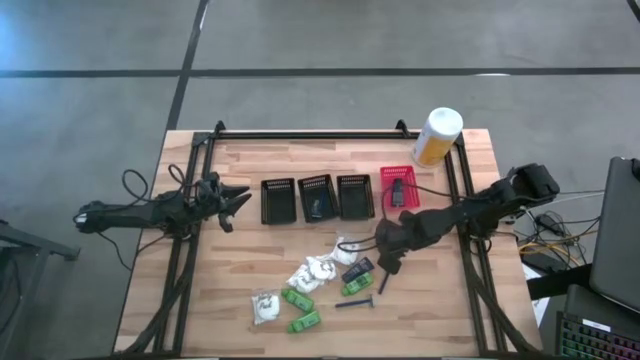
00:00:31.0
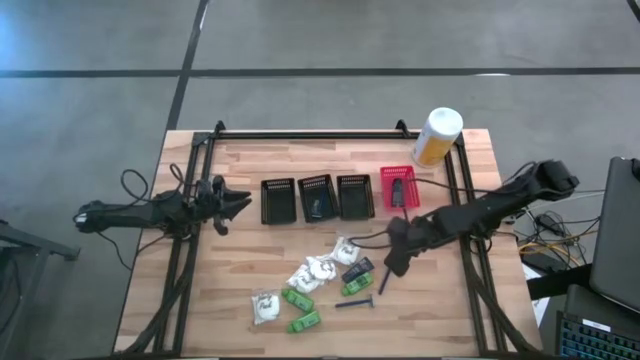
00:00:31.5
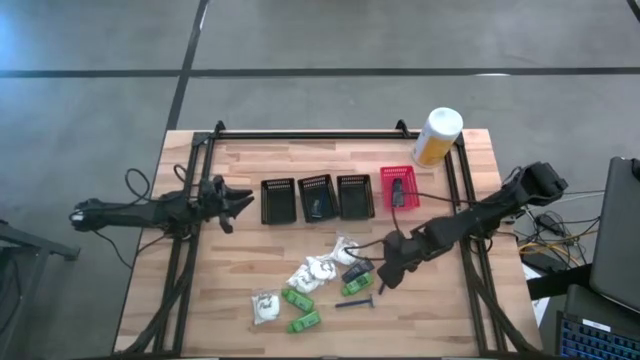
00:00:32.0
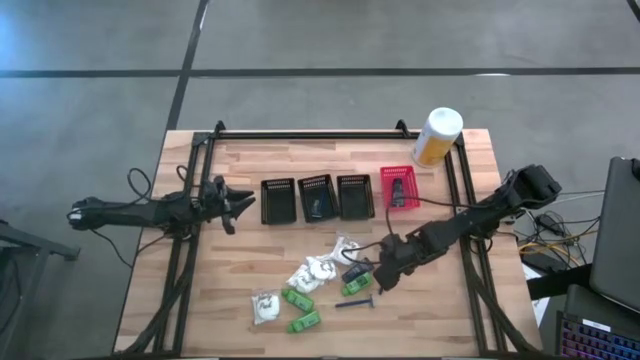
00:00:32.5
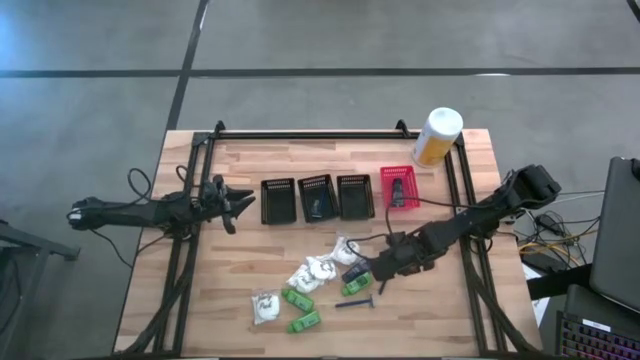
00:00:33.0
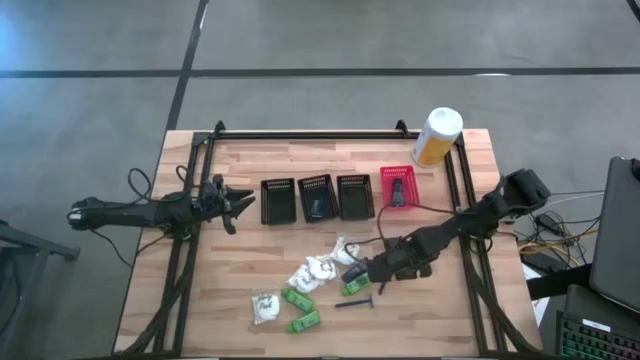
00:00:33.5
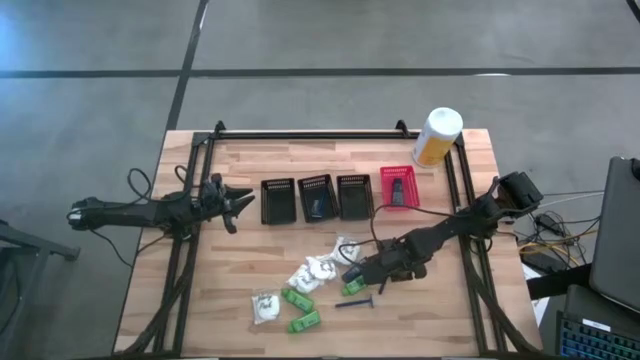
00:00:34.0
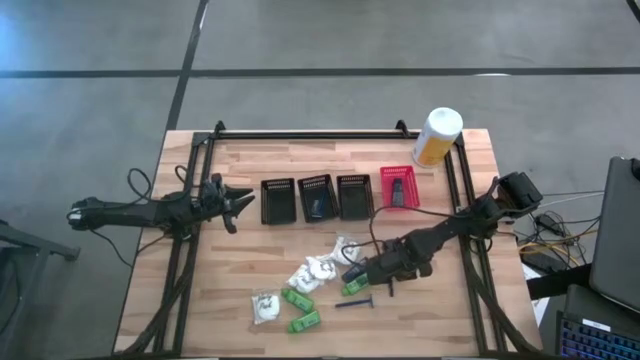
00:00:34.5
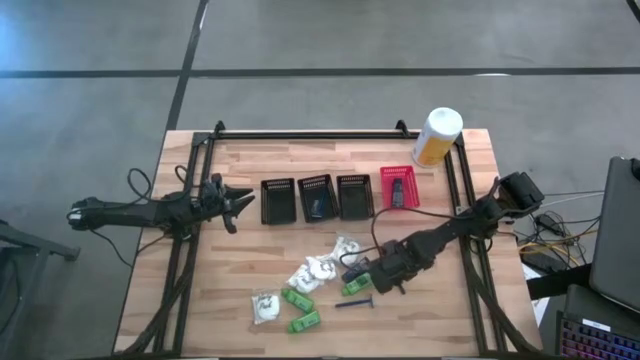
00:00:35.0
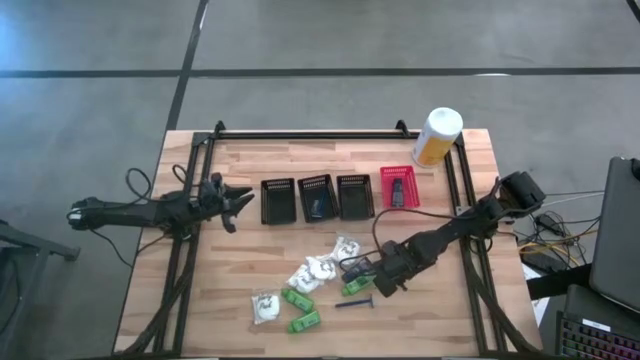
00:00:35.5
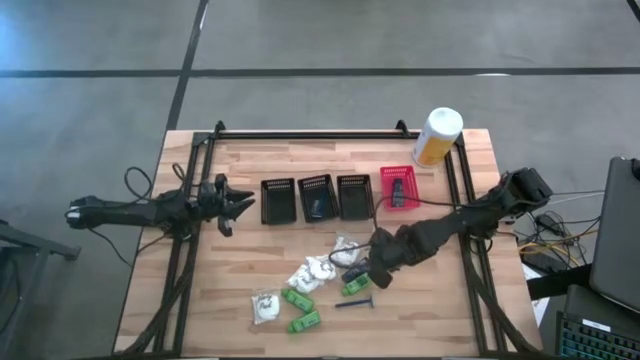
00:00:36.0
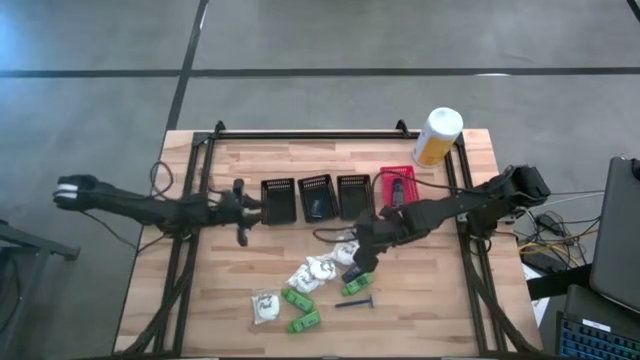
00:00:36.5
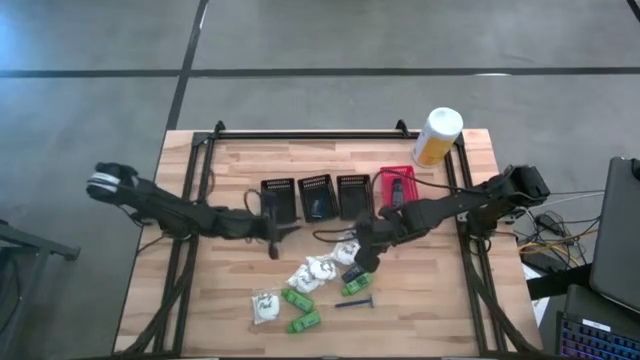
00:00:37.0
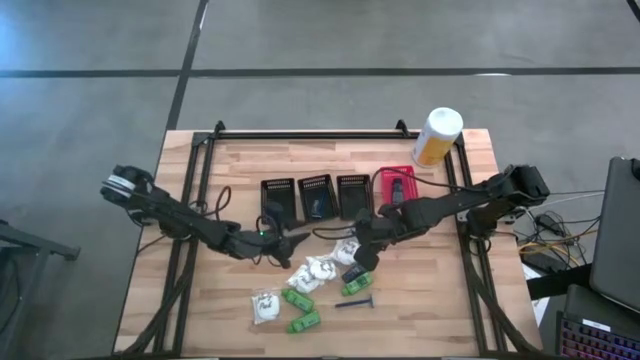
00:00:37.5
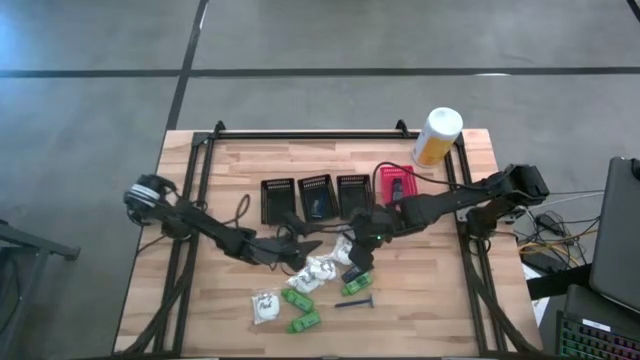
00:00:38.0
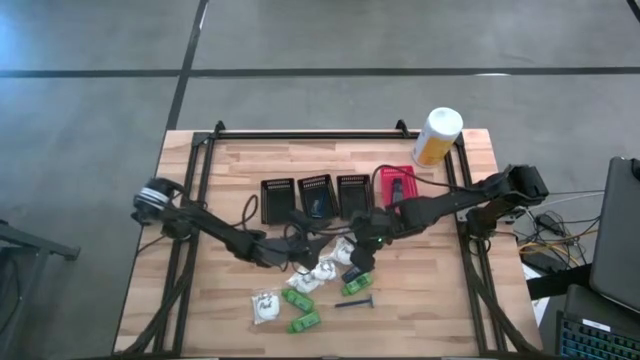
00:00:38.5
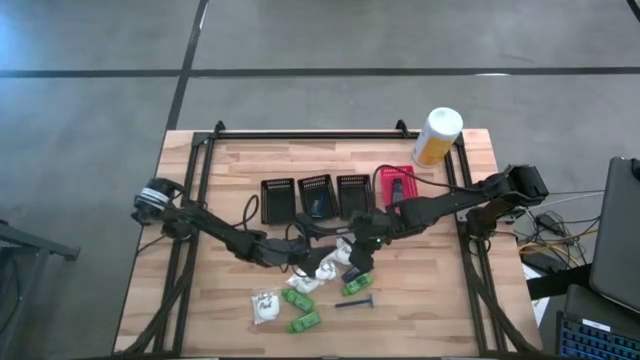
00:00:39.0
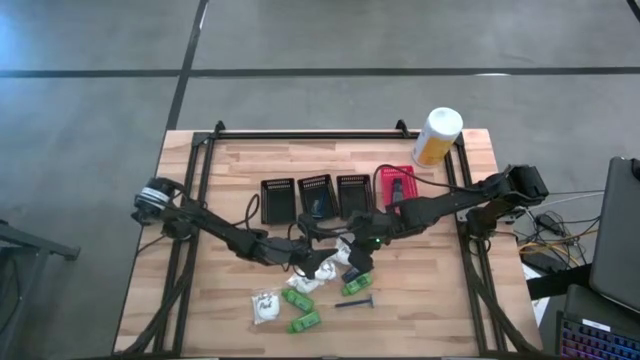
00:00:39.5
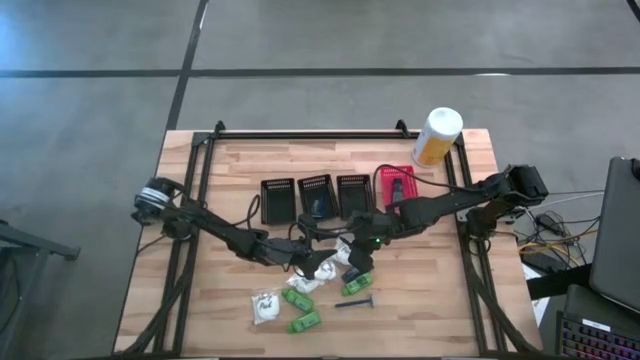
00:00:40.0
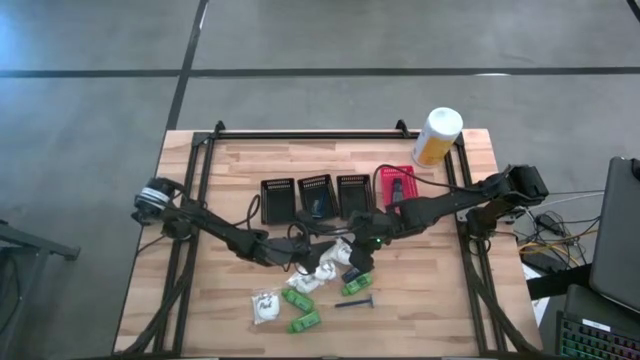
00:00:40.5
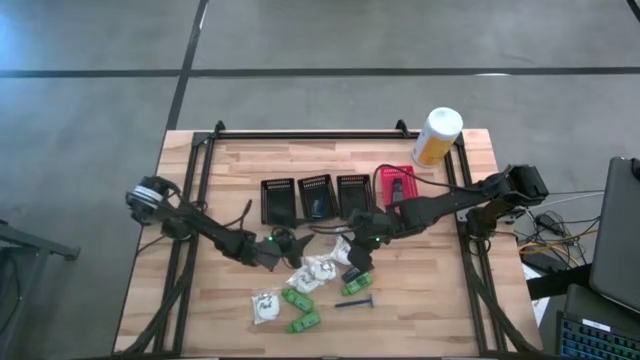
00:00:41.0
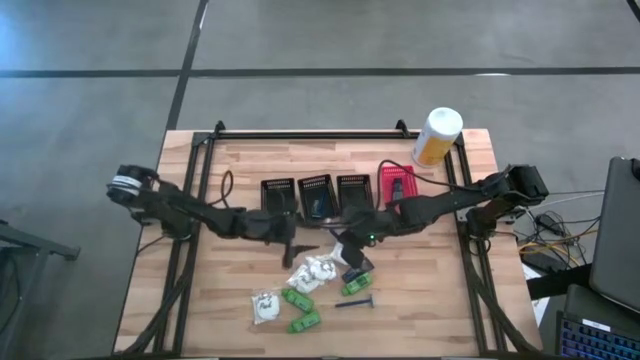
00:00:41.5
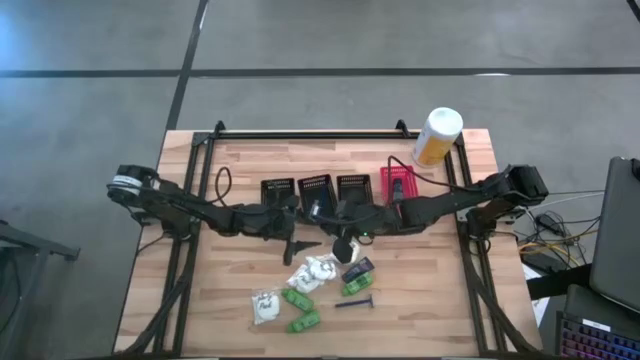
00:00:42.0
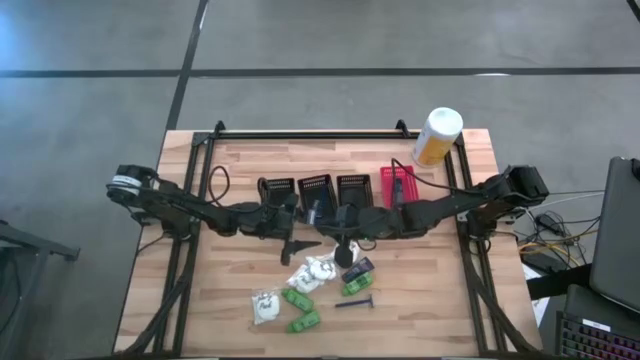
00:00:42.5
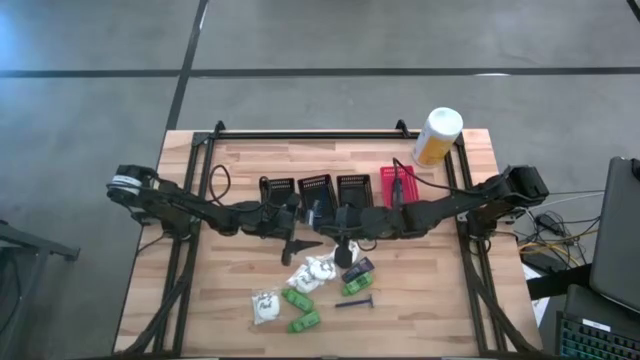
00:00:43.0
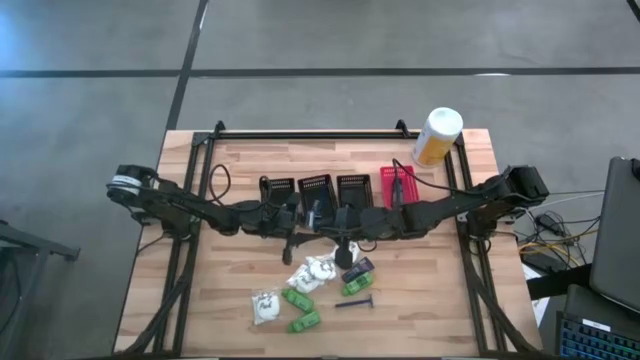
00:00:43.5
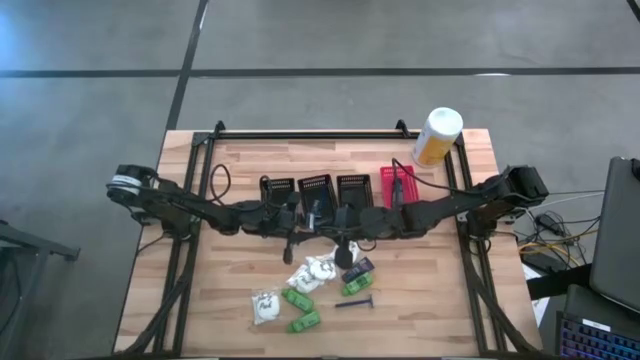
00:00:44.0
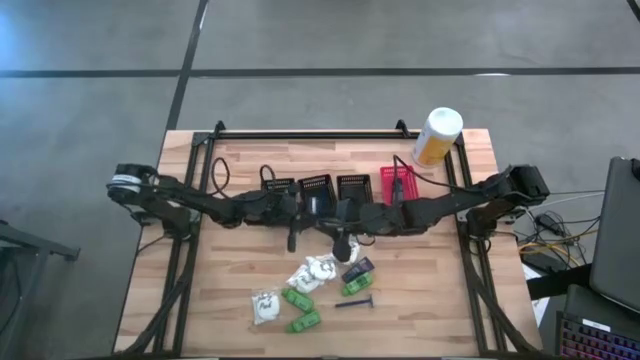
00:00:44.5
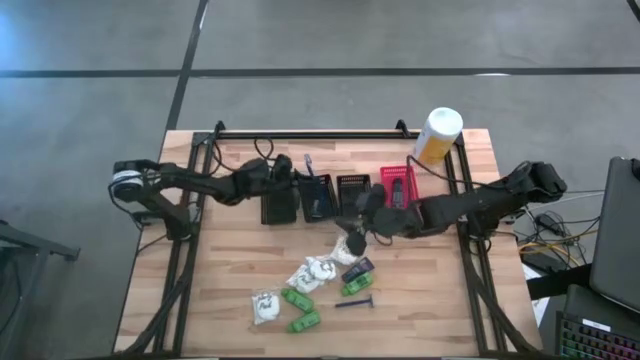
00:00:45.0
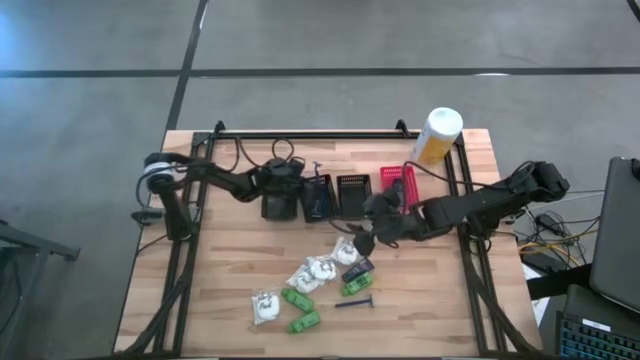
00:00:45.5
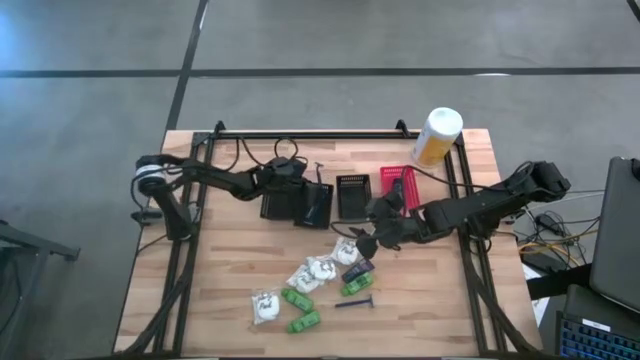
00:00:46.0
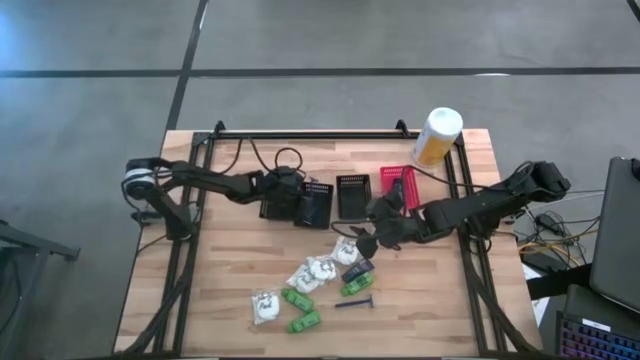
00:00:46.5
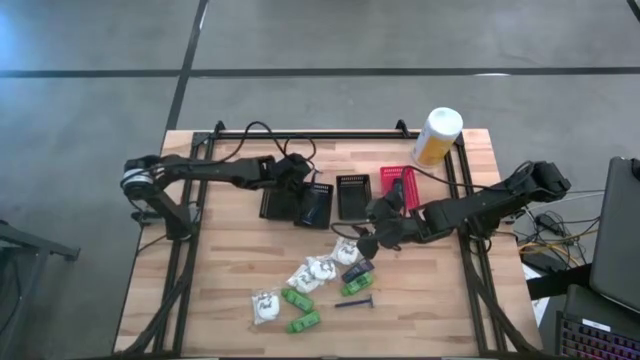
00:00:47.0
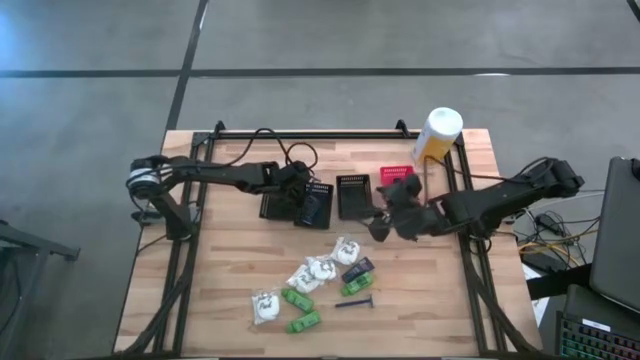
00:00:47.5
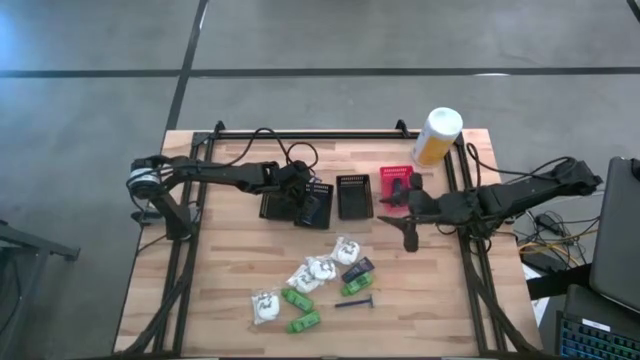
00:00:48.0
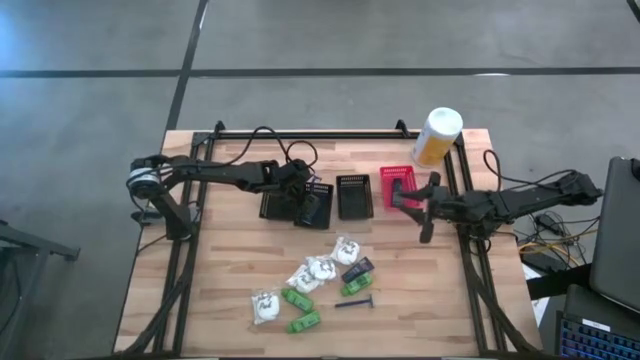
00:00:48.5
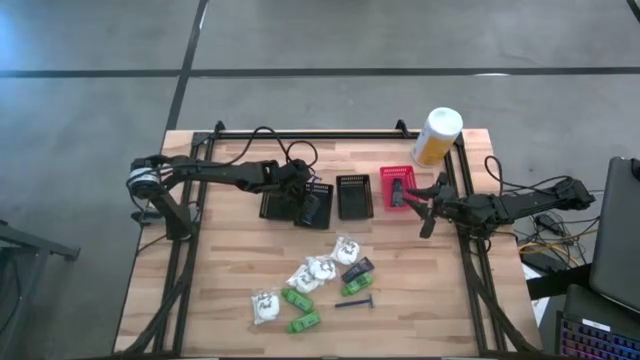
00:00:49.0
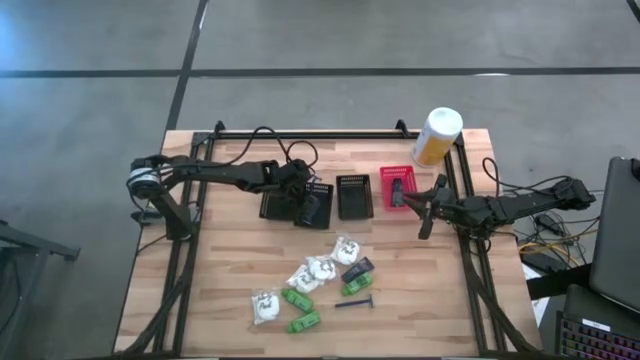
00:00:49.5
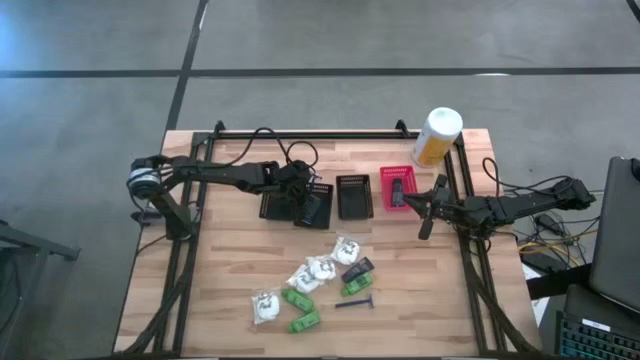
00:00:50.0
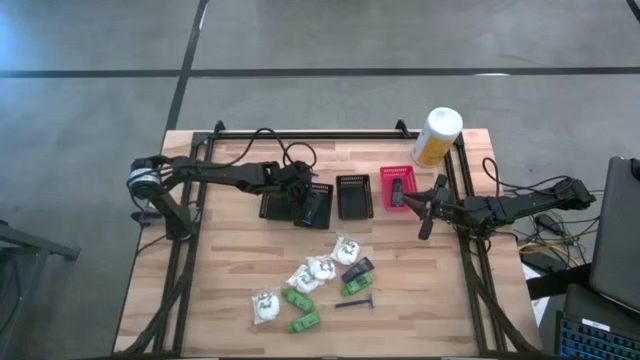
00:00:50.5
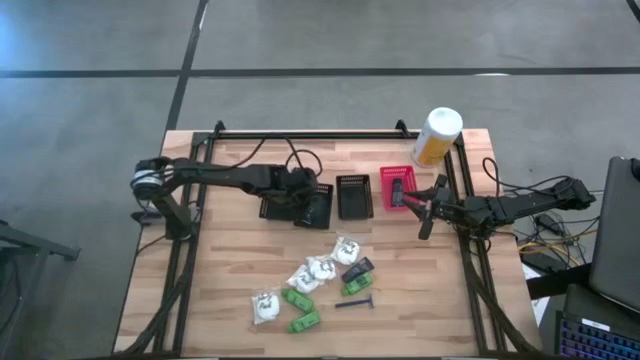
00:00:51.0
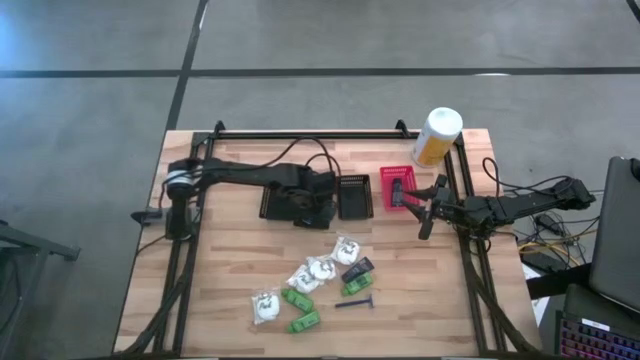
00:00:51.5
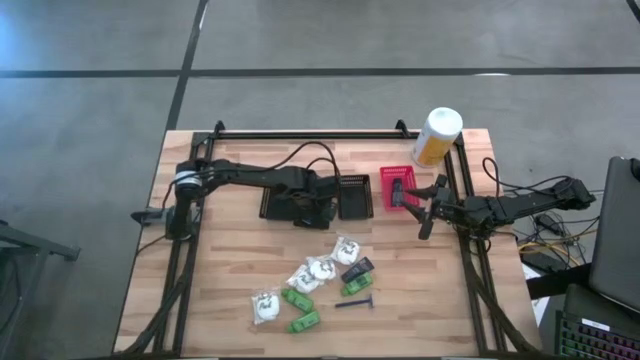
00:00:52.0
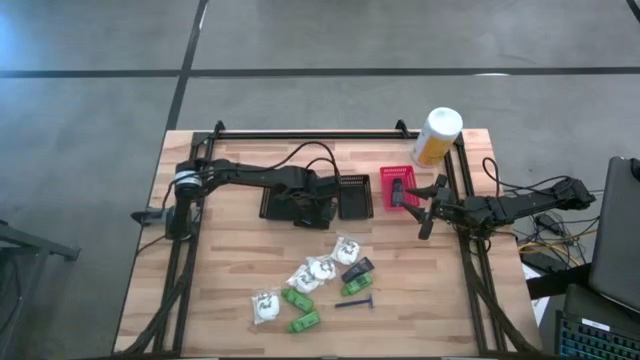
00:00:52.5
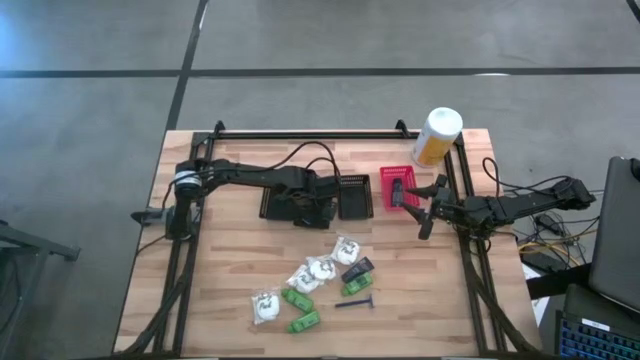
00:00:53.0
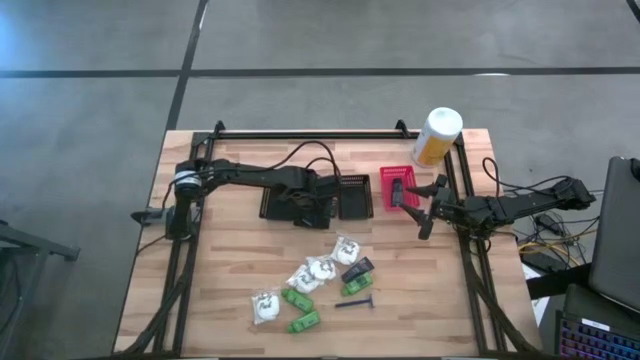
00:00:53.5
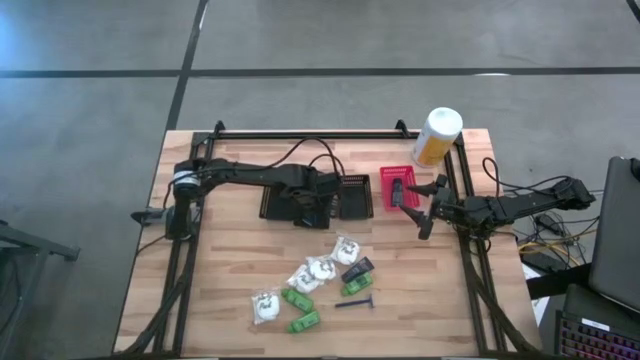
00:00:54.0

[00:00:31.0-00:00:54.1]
Task: Pick & Place Travel size toiletries
Put the right blue razor into the middle black bin
